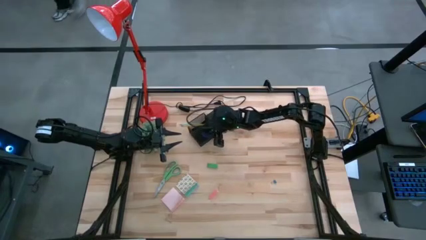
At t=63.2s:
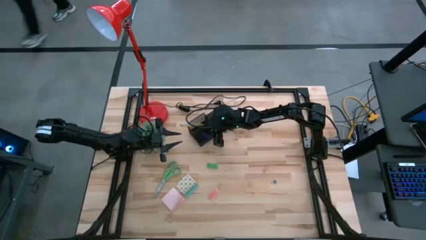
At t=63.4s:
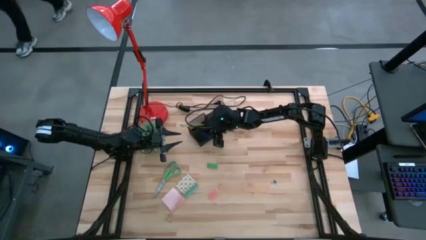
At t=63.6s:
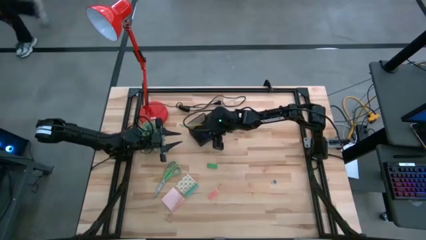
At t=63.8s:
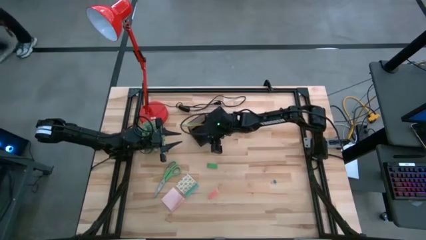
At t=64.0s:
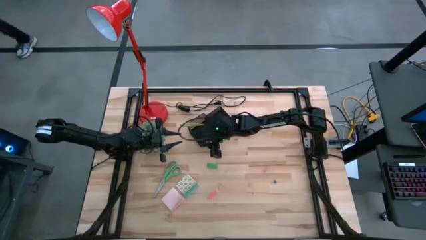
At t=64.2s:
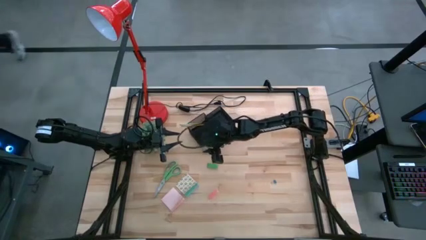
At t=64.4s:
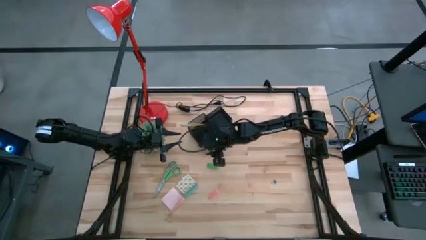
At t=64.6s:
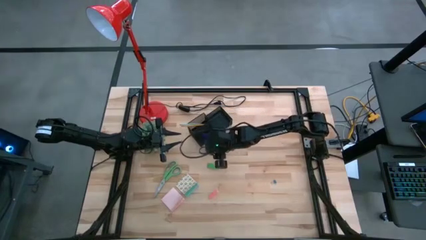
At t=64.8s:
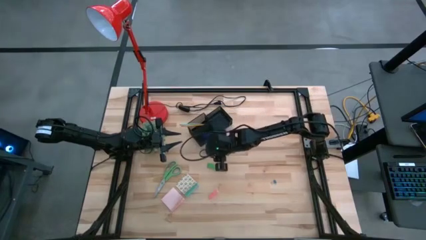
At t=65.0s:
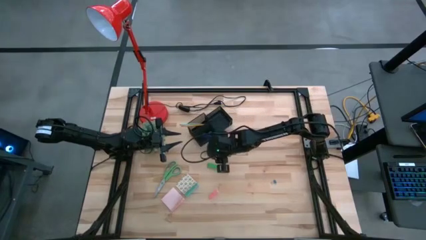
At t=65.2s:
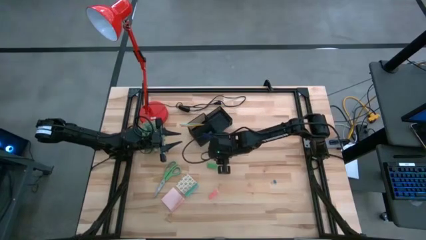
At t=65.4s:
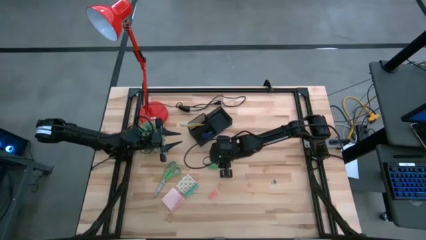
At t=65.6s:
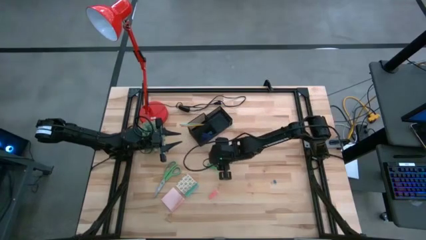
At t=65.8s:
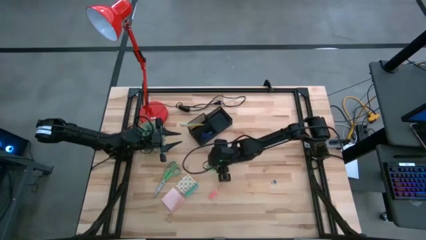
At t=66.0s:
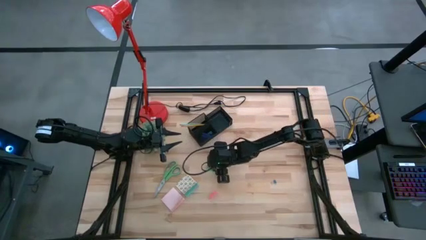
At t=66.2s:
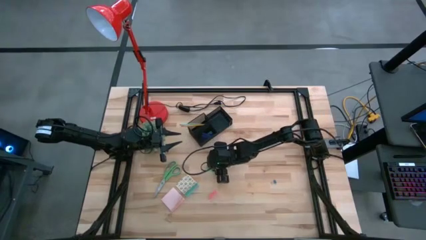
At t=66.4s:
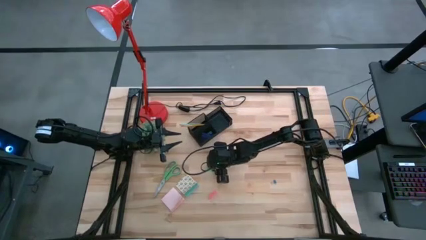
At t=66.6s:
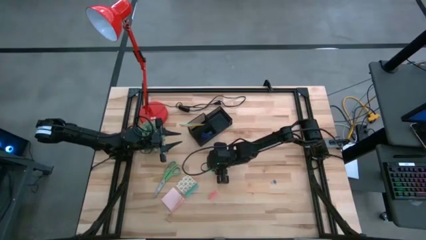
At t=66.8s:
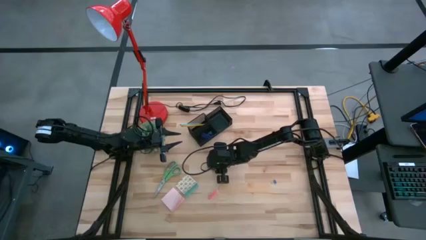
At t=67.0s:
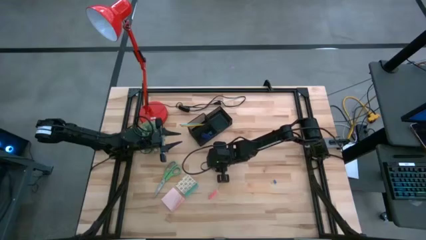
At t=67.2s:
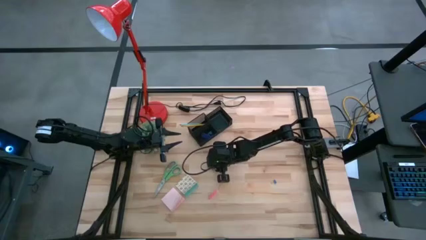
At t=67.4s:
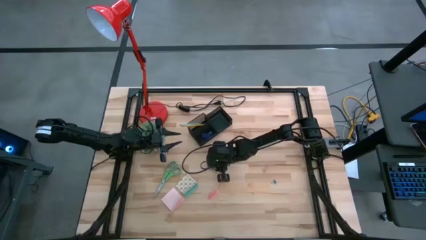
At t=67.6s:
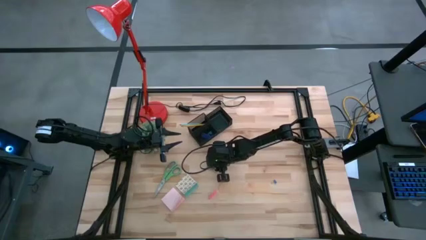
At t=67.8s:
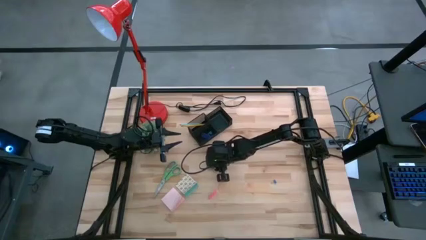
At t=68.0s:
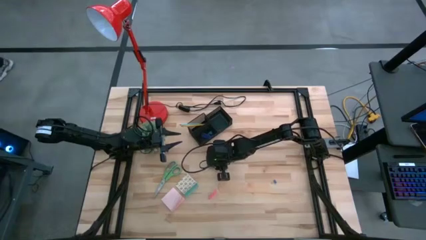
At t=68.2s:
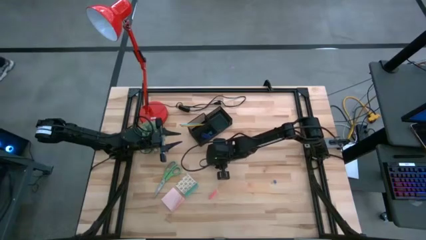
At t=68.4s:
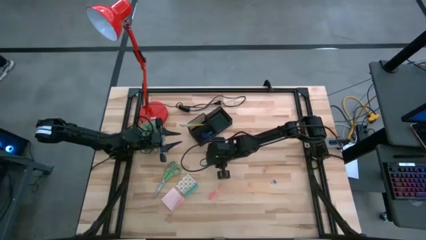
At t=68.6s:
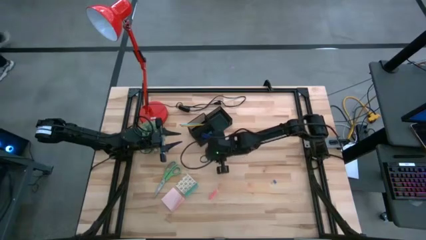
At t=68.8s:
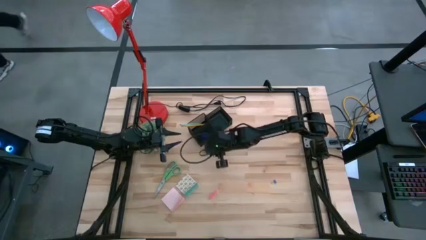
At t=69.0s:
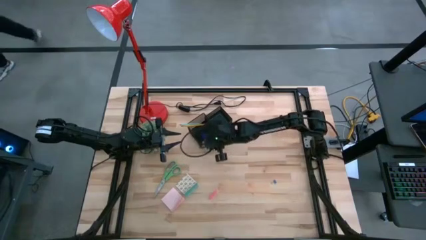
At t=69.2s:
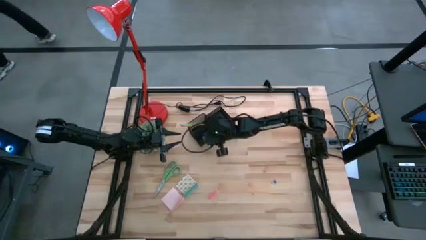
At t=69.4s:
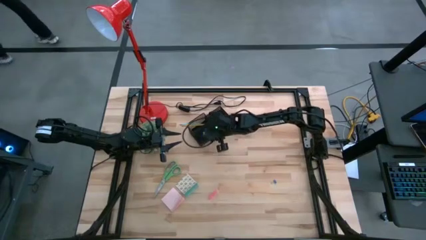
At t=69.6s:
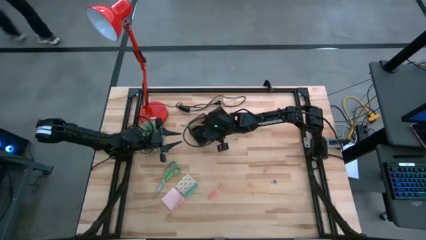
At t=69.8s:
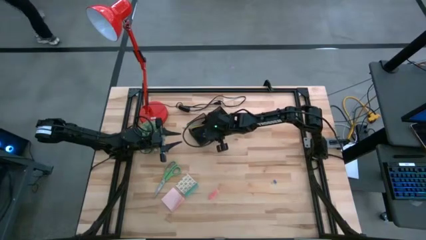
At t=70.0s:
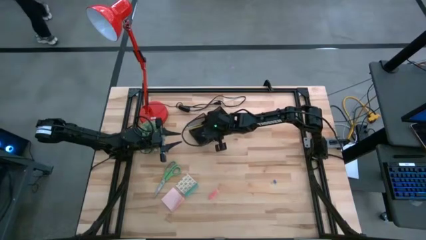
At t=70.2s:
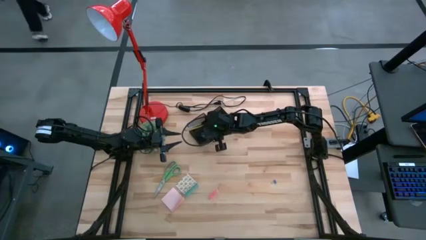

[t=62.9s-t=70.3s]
Task: Pick and place office supplies into organizer
Put the green eraser into the black desk organizer

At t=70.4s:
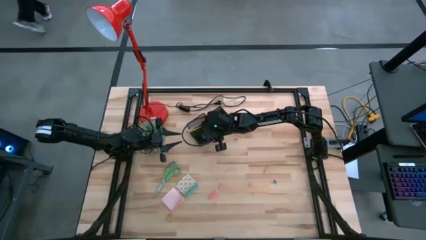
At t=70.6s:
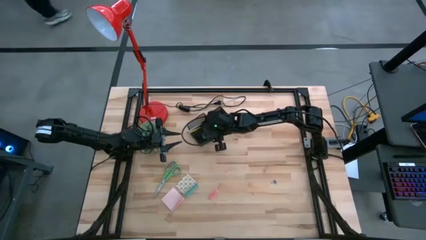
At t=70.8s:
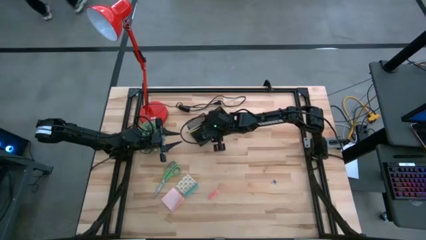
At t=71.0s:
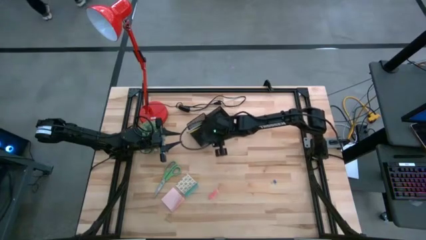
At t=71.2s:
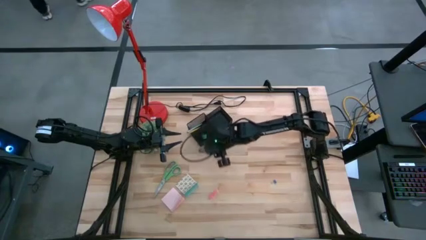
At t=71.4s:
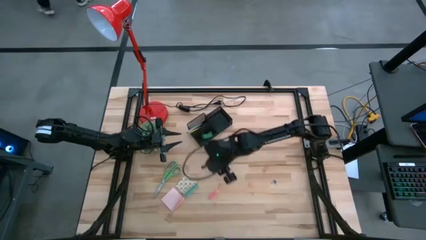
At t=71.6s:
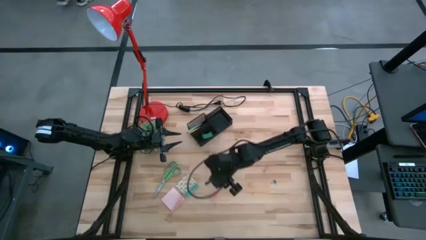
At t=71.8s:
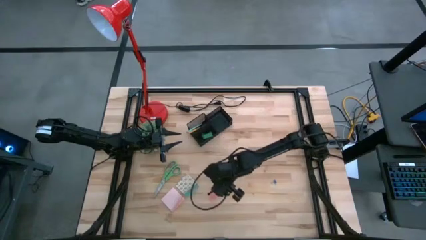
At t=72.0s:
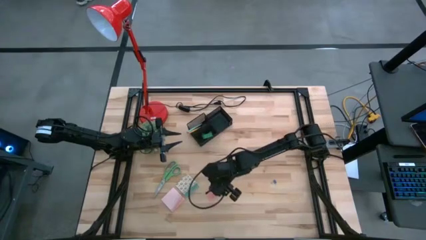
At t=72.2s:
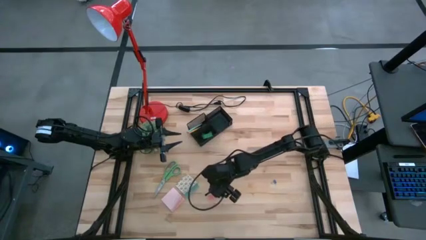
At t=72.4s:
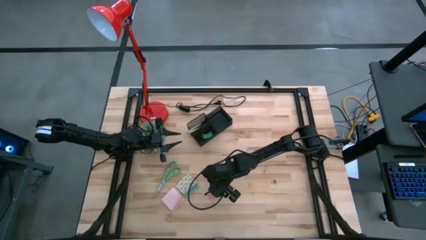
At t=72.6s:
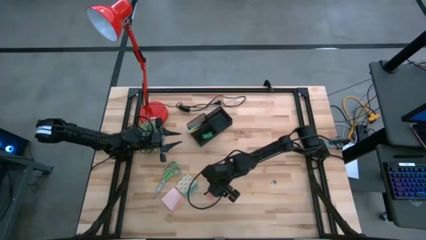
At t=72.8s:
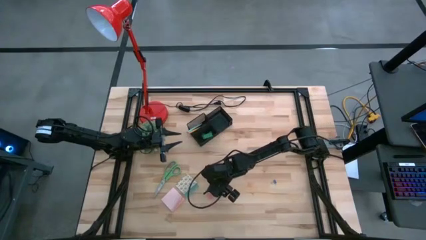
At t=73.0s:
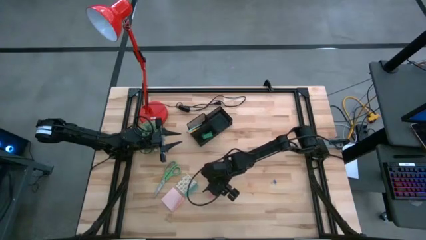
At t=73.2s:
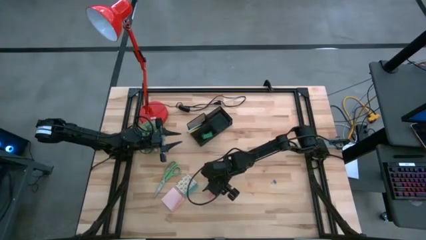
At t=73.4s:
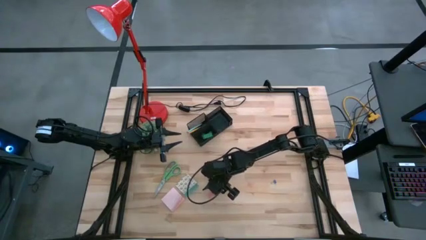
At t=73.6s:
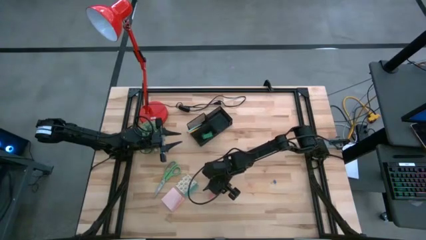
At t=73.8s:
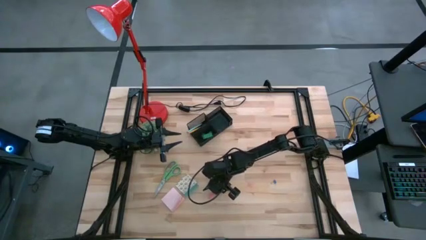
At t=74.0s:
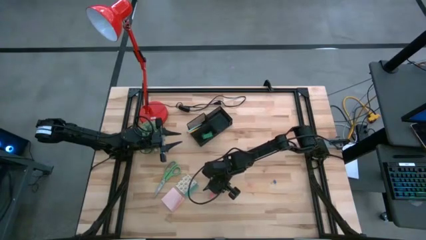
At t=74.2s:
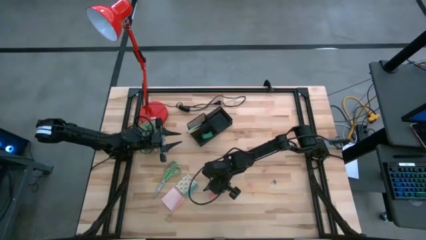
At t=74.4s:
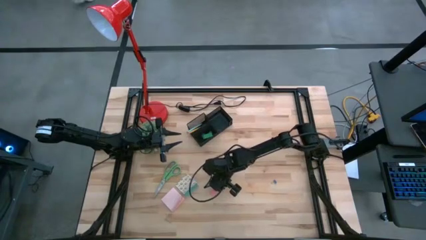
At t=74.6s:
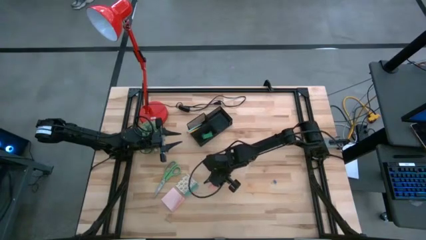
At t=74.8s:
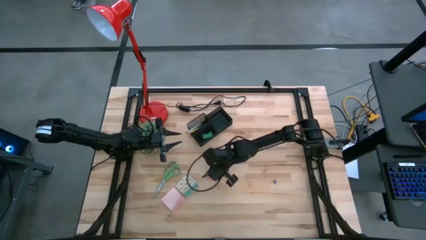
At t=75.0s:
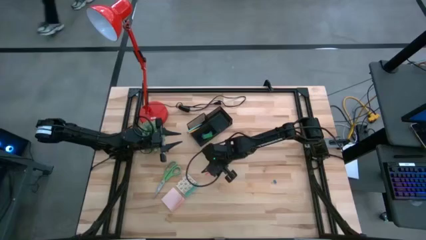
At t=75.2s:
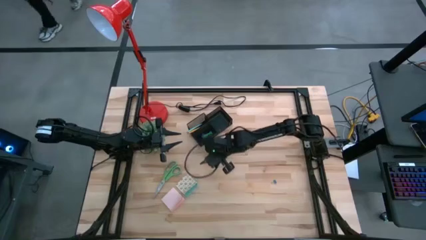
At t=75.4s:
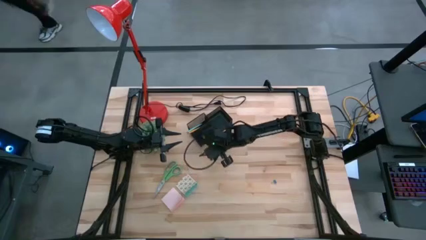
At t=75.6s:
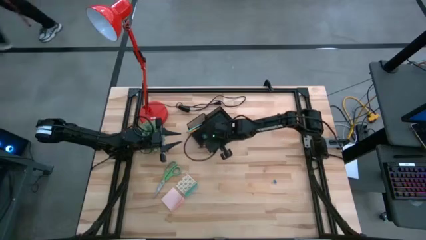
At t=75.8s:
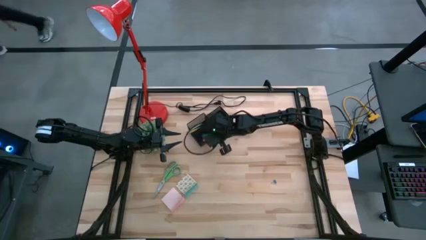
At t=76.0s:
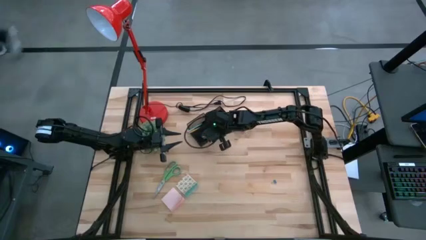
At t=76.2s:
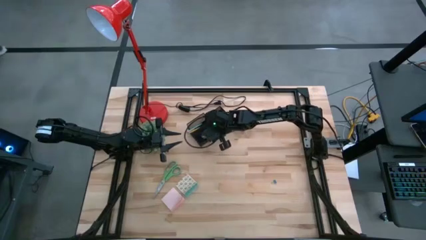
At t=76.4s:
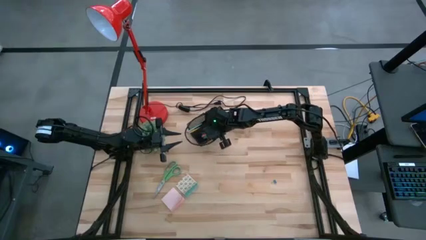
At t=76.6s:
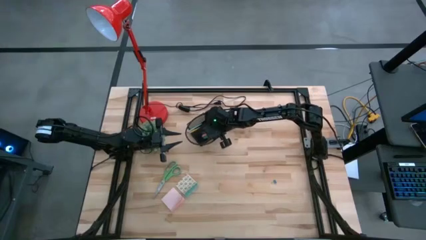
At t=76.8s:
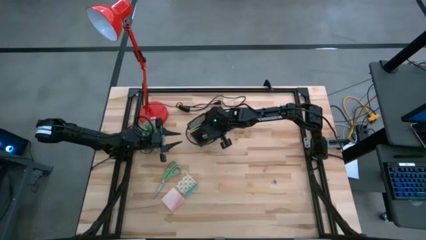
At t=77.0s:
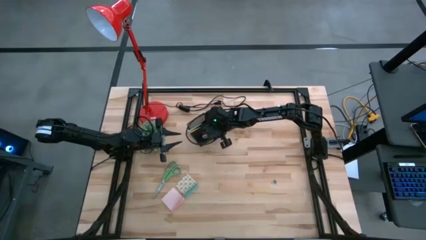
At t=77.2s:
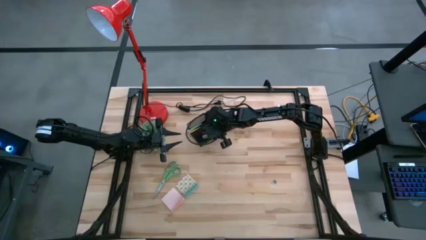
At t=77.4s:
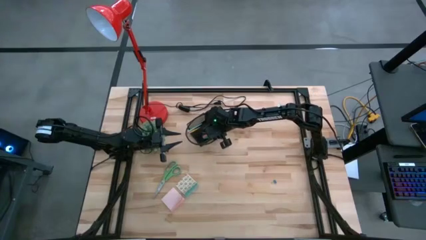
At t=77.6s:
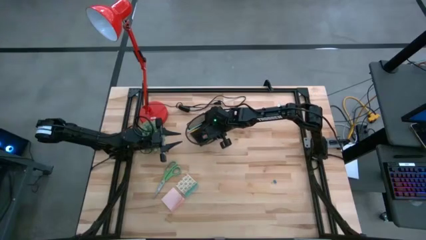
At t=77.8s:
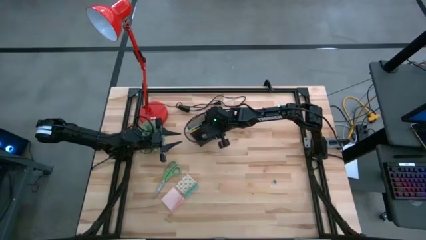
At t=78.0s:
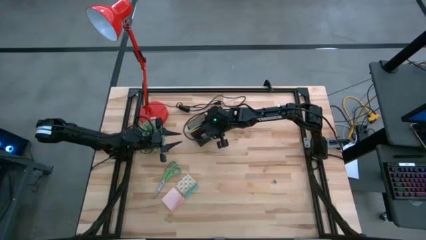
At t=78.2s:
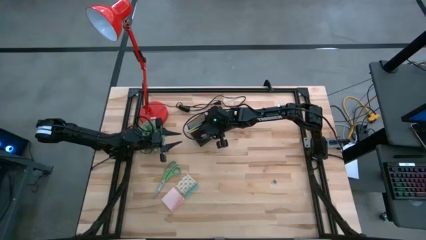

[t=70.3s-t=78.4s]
Put the pink eraser into the black desk organizer
